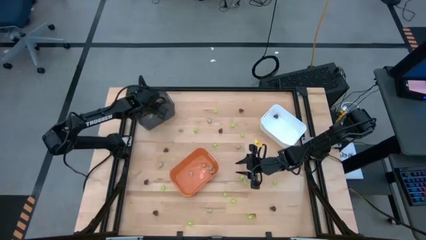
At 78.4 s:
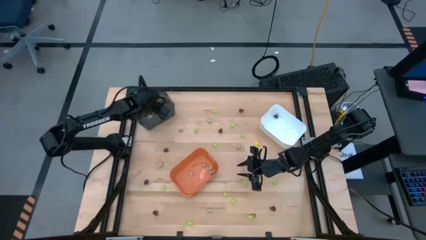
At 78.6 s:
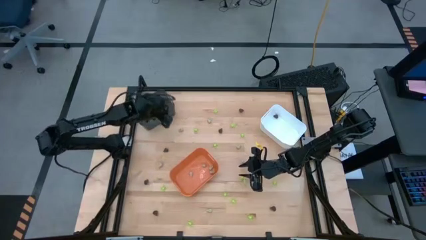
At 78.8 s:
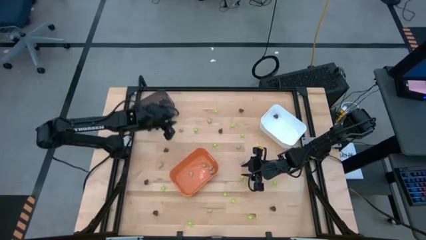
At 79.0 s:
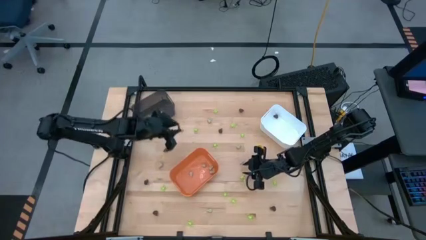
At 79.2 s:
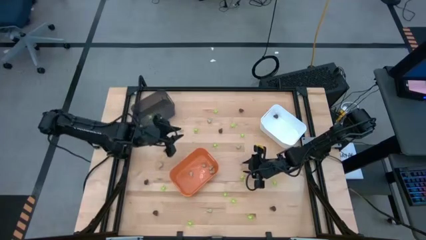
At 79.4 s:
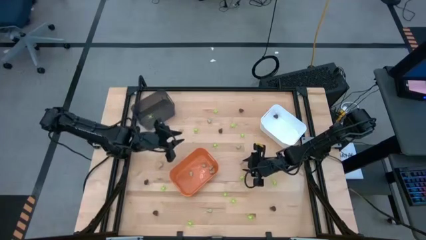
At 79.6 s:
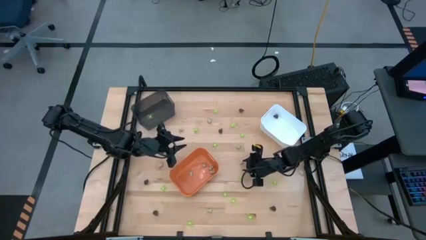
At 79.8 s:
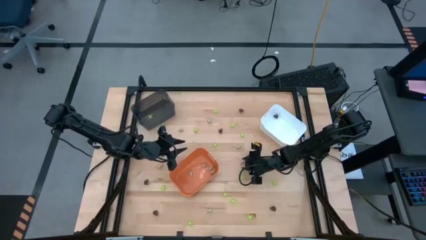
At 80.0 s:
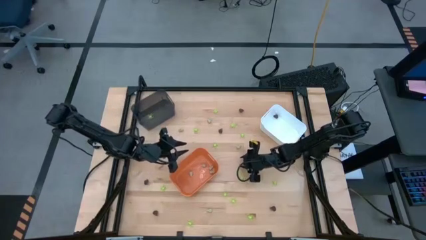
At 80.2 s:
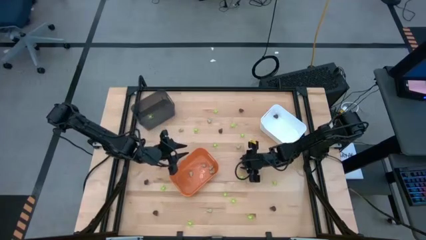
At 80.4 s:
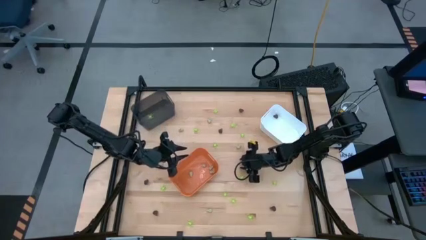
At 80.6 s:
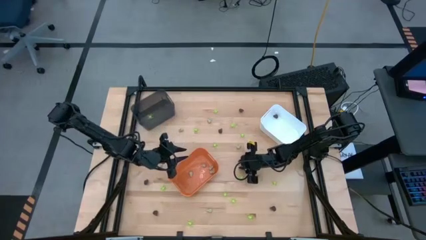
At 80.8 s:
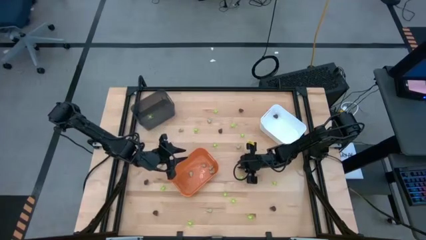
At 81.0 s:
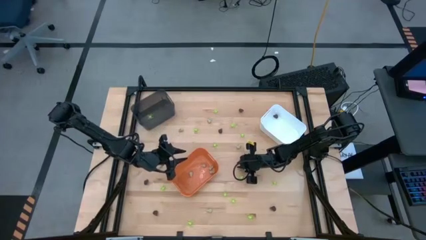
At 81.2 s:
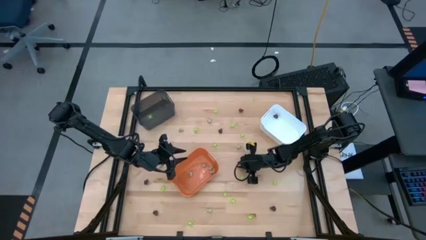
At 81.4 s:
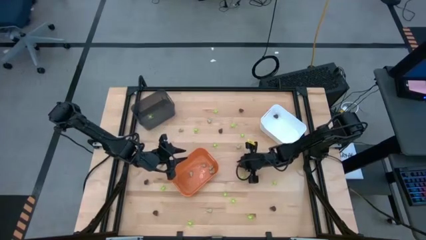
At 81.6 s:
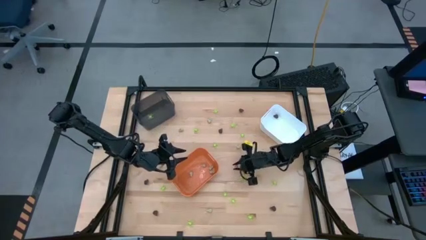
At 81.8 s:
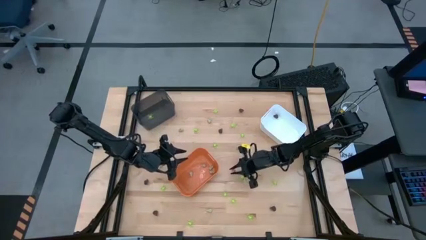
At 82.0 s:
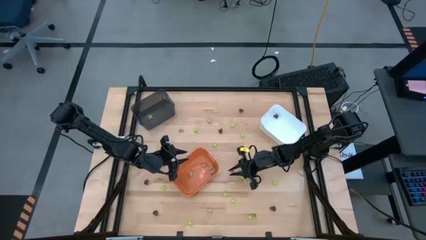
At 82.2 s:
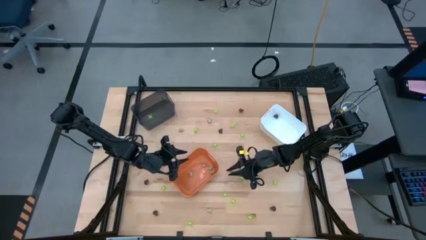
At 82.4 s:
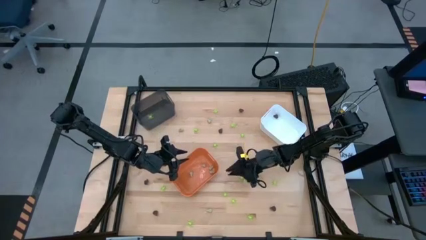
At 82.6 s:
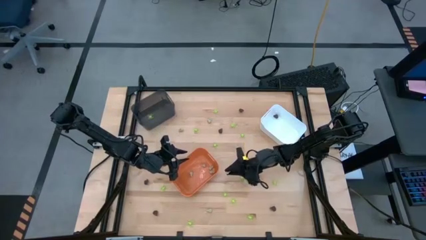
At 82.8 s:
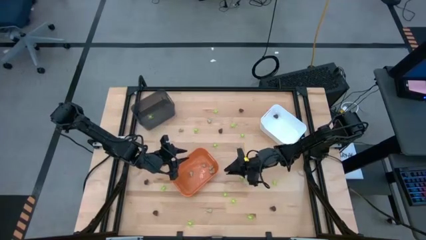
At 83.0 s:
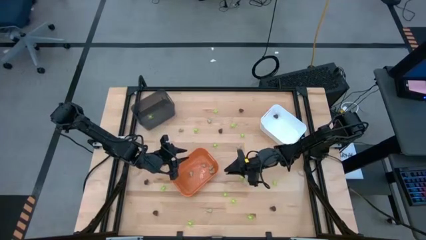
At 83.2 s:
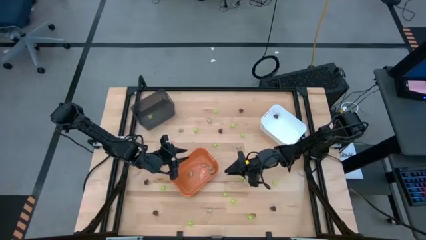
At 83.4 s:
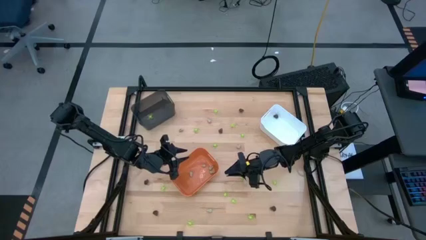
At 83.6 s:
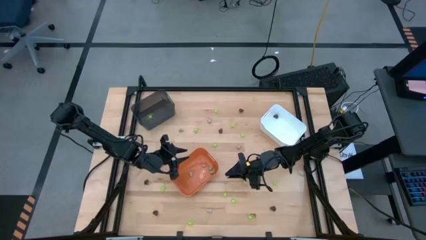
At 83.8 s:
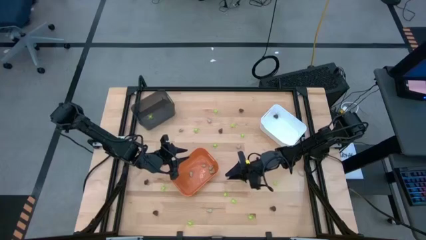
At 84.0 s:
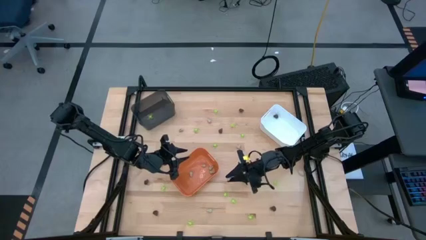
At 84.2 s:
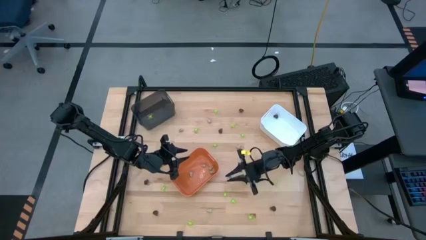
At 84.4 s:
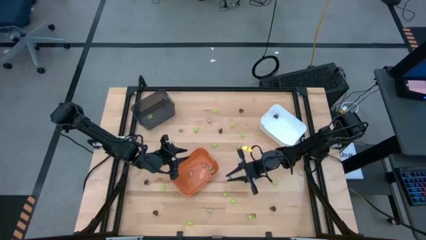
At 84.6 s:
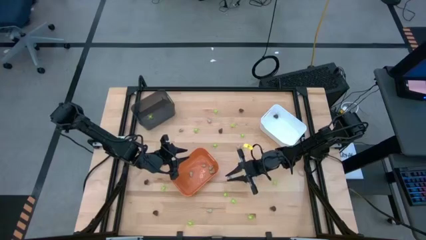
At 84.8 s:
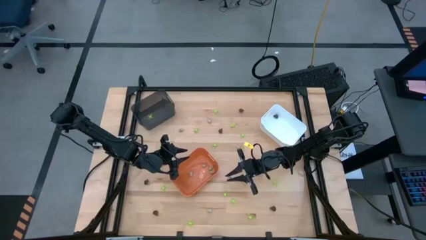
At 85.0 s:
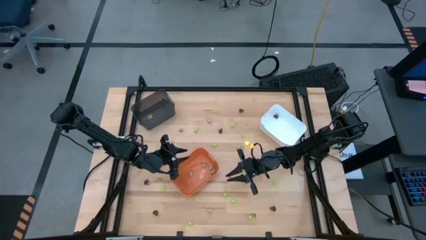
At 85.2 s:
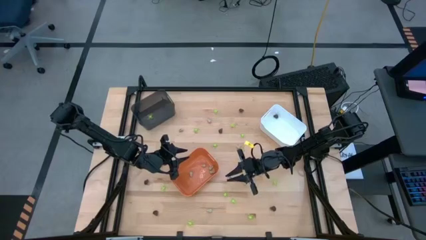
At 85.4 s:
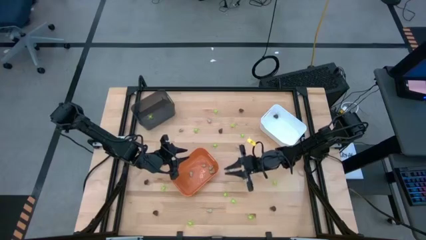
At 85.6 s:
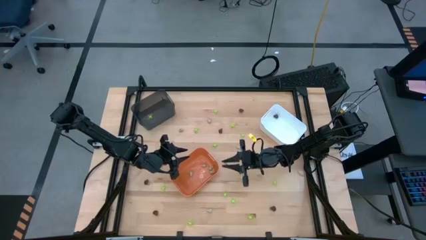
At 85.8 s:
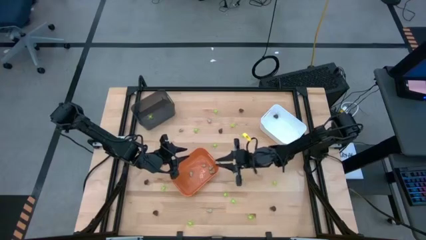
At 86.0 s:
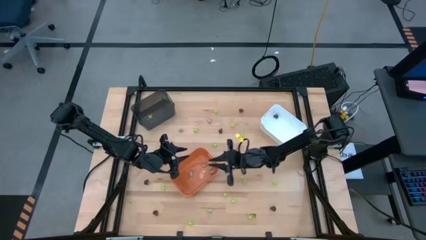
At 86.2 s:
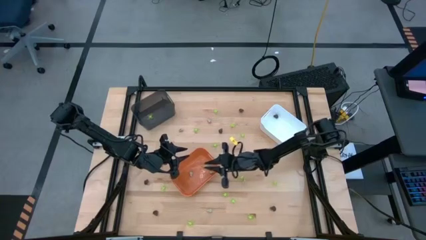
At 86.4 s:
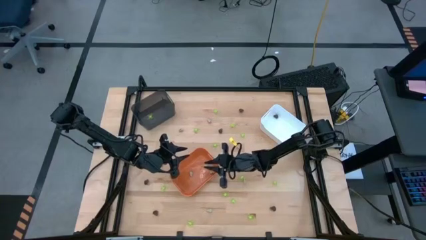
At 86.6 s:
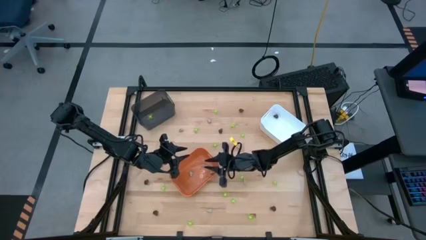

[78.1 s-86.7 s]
Task: Sort Halloween decoration
Put the small white skull toy into the orange bin

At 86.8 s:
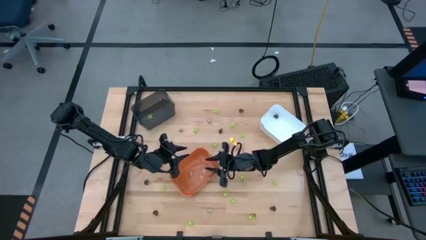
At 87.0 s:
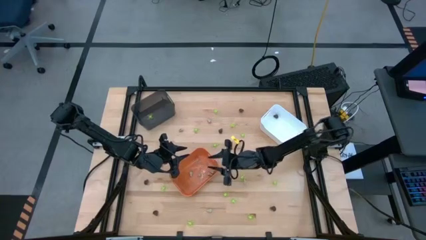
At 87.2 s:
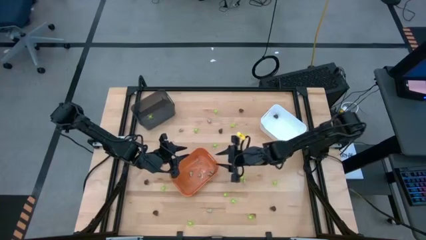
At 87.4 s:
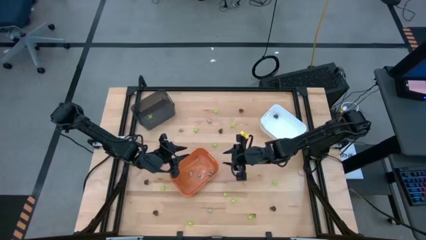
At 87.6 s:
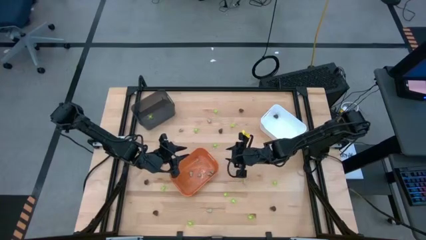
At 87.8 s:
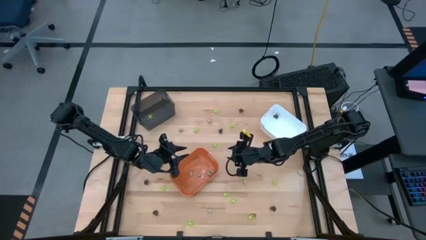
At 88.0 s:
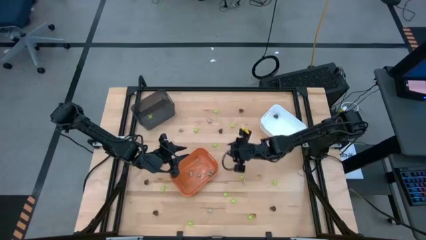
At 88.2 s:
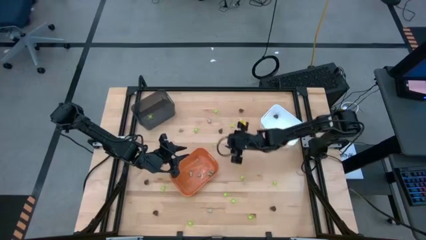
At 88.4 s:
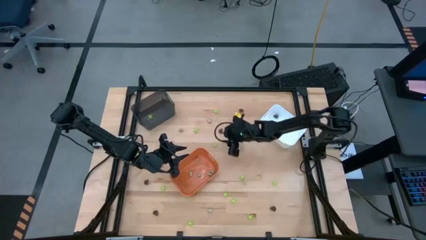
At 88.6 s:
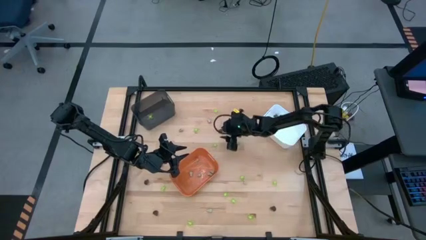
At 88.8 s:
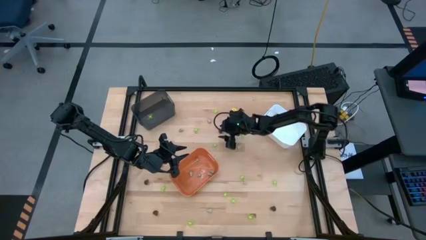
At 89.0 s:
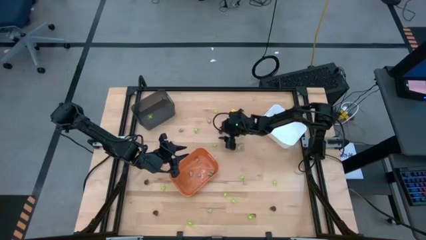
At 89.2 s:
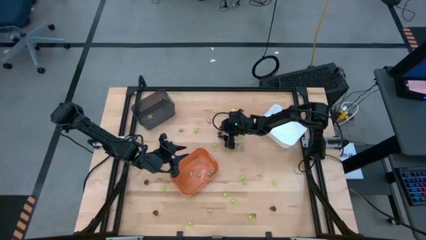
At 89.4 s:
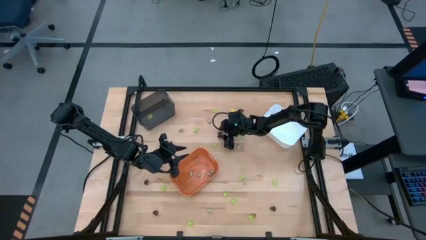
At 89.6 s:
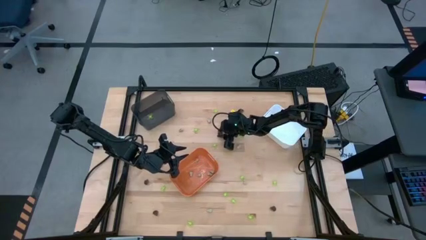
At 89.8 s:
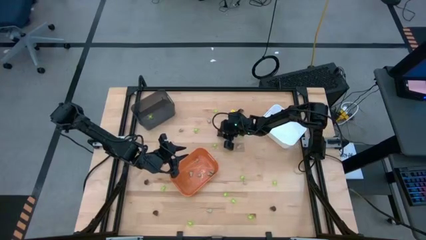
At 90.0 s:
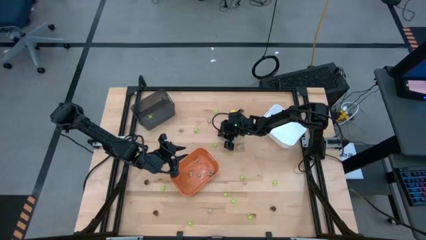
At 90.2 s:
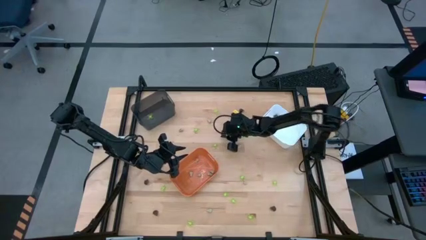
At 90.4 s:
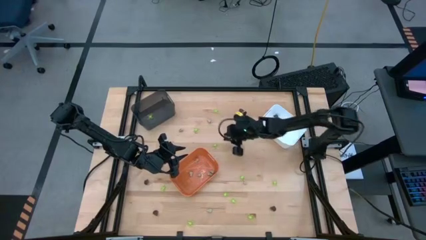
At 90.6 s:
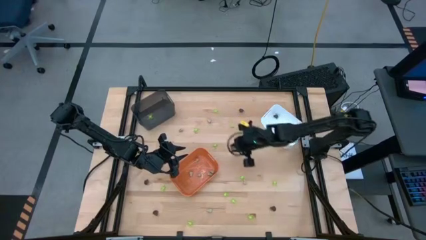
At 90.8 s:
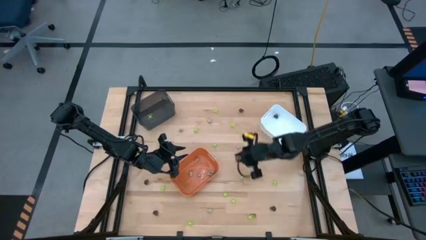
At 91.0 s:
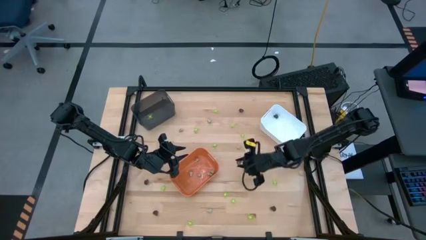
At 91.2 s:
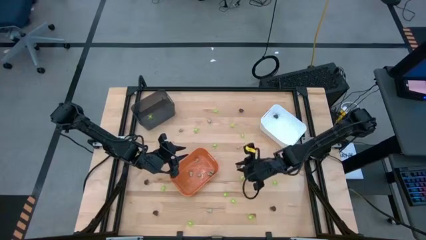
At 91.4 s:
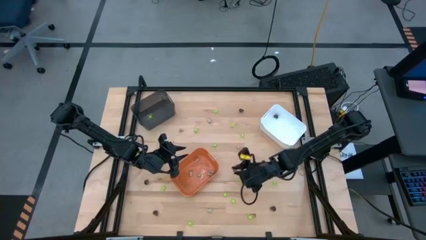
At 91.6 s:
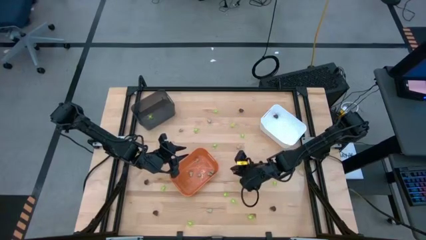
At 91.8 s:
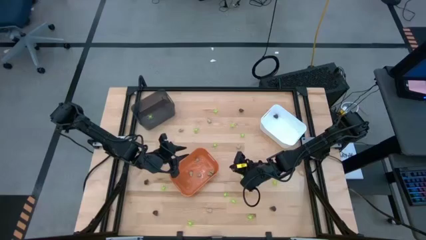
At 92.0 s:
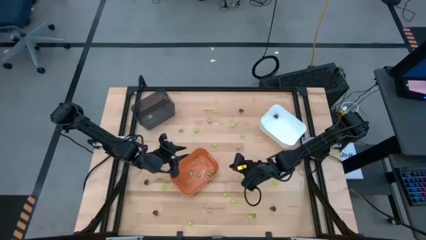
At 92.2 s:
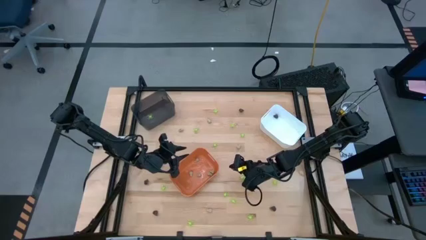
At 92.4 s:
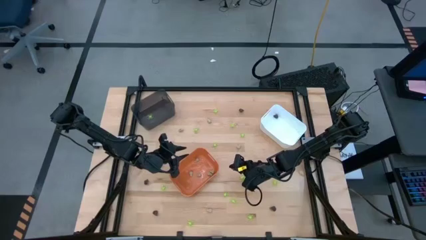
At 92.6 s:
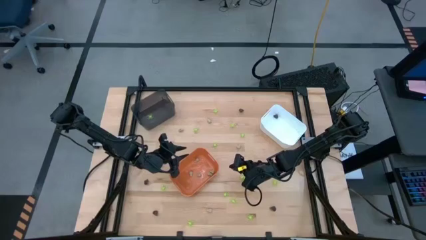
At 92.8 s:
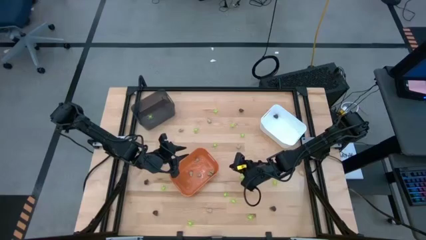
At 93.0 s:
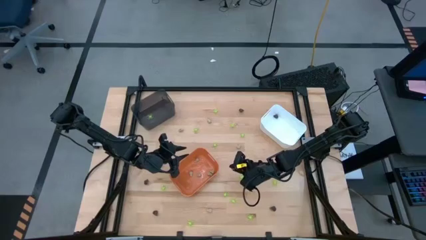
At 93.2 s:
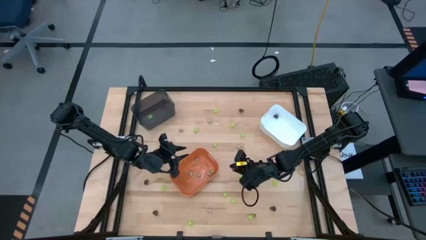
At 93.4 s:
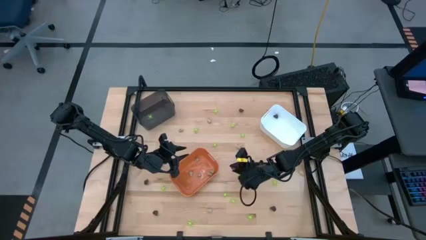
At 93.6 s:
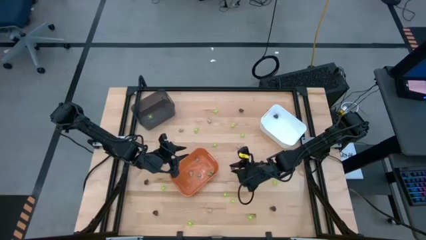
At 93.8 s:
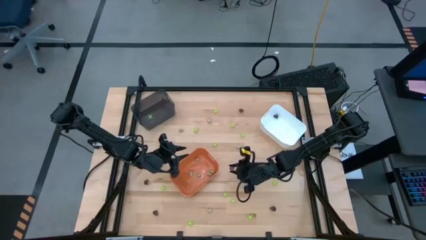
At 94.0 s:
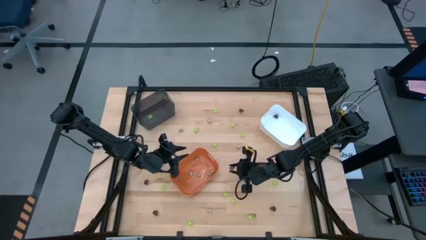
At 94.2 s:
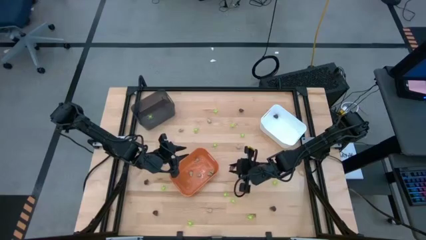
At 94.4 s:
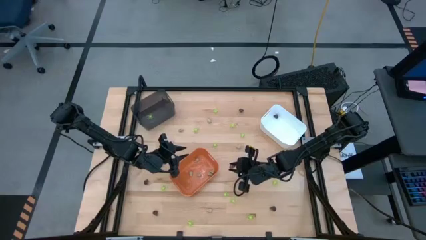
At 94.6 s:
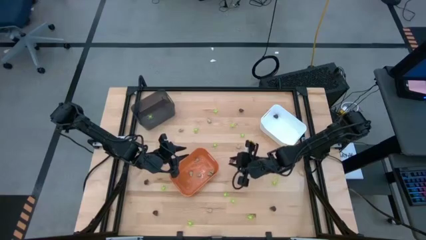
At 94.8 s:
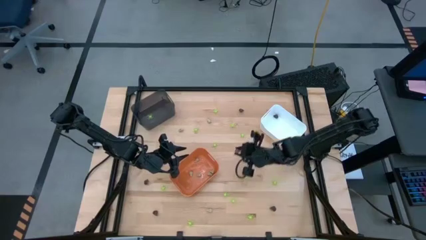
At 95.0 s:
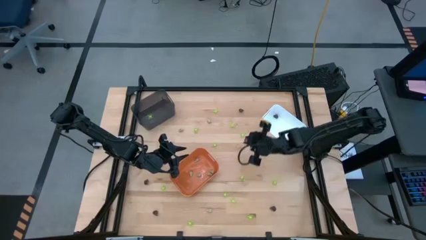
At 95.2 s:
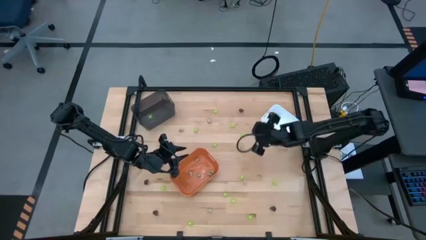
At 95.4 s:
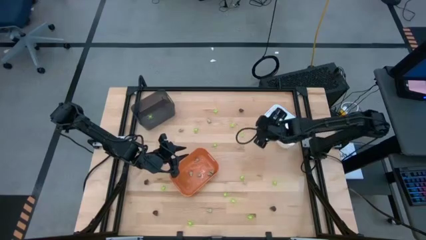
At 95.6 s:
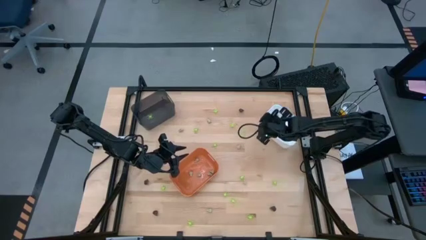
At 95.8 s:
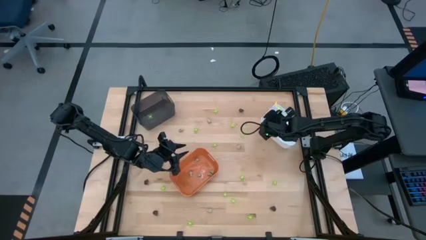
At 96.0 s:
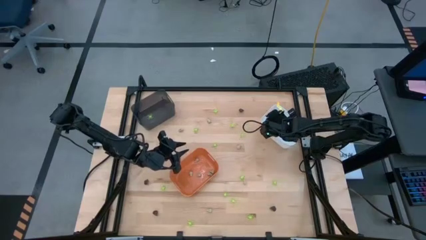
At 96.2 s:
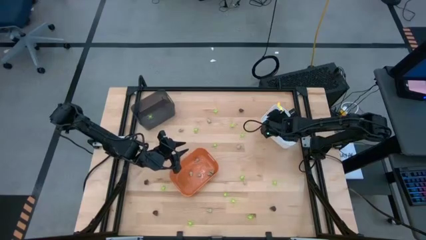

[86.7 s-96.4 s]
Put the small transparent skull toy into the white bin
